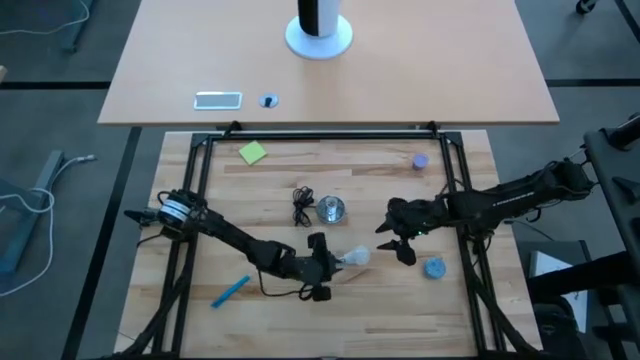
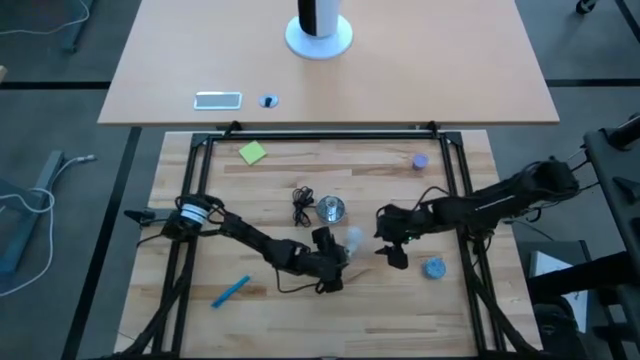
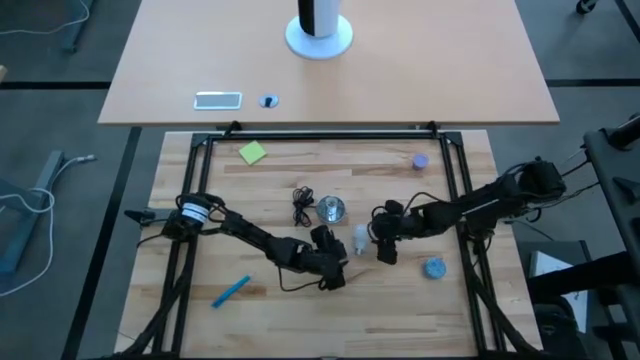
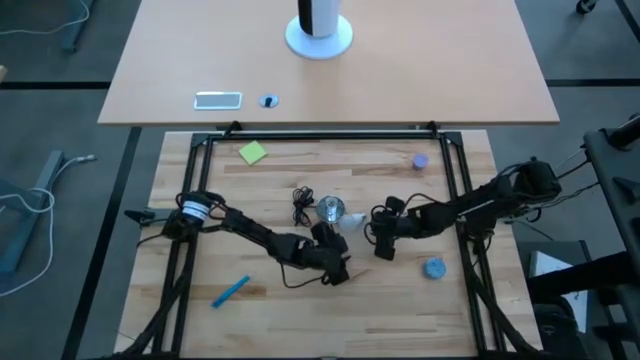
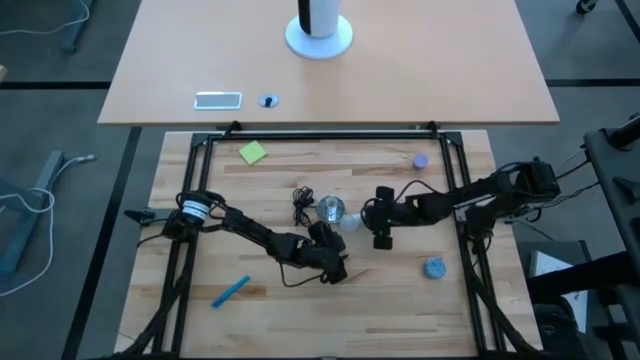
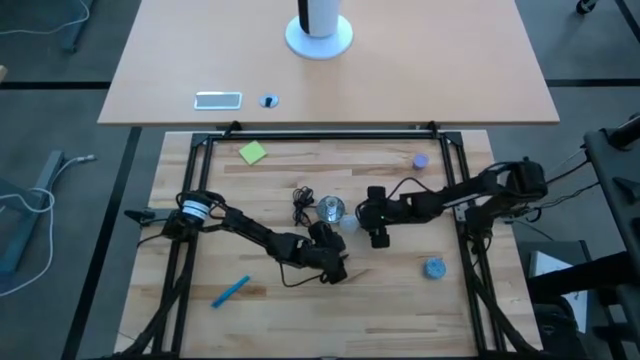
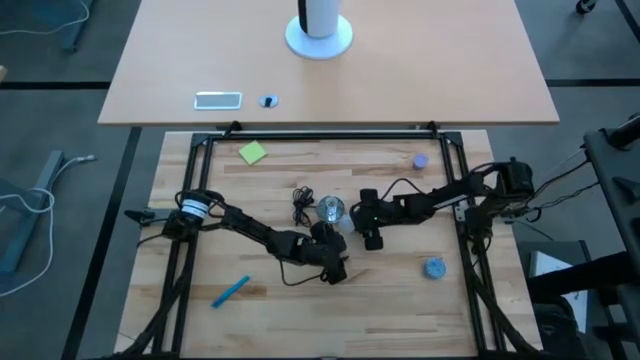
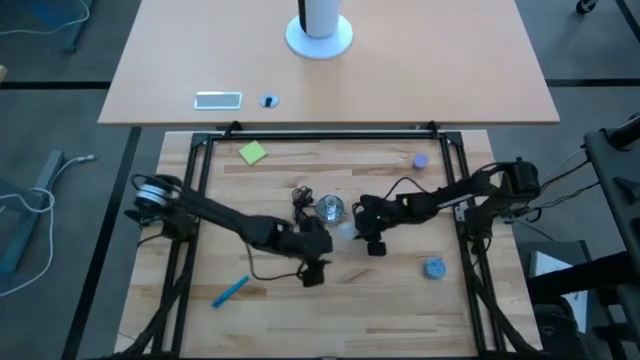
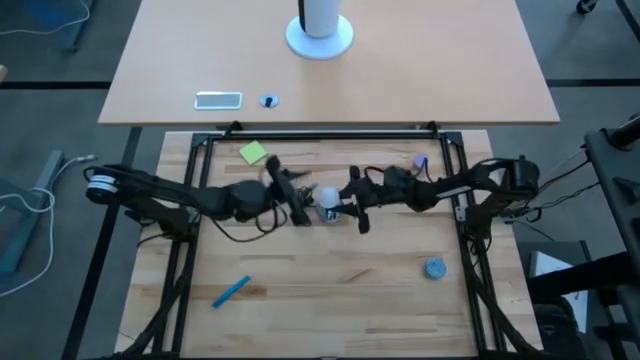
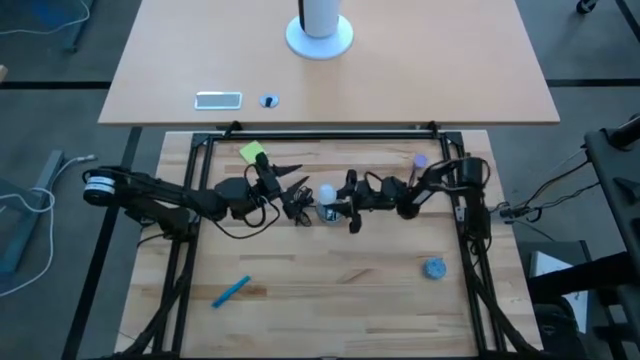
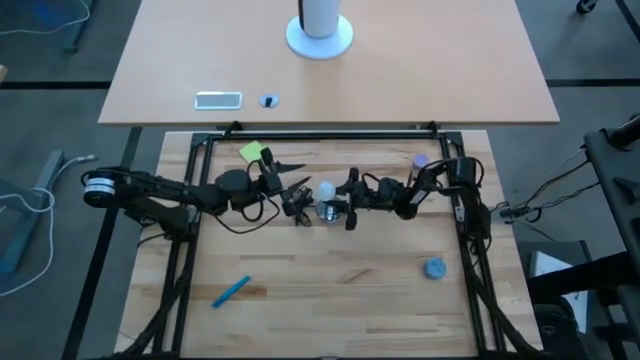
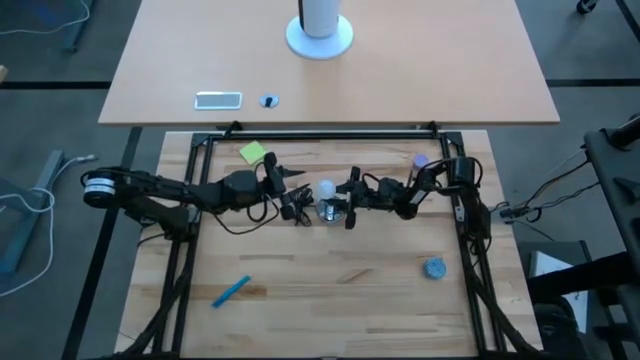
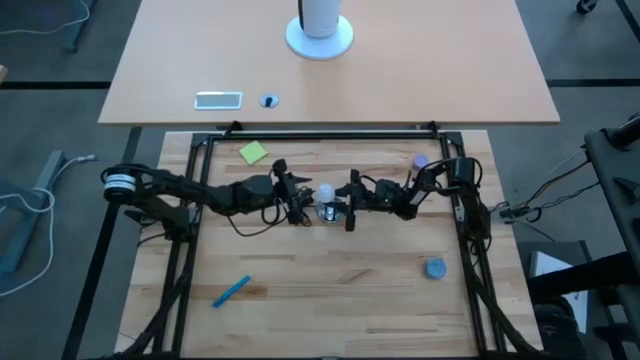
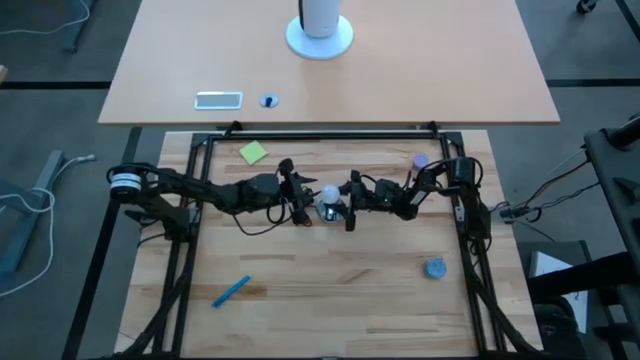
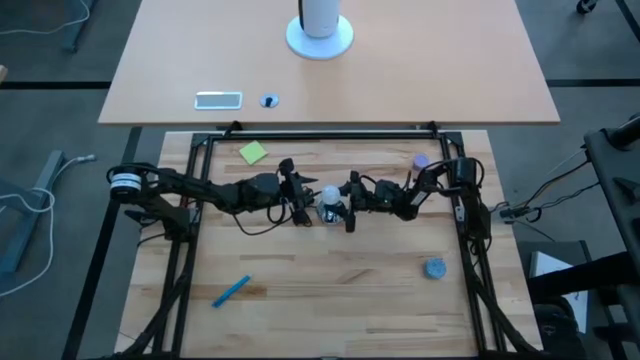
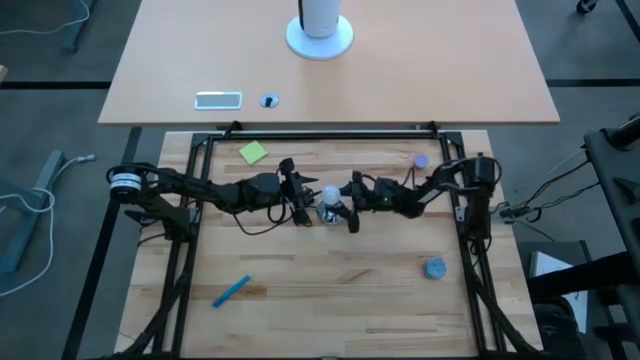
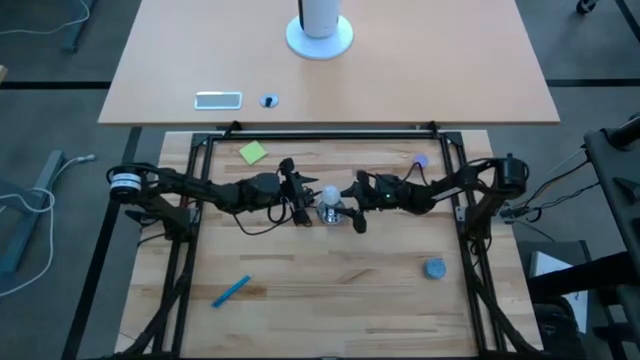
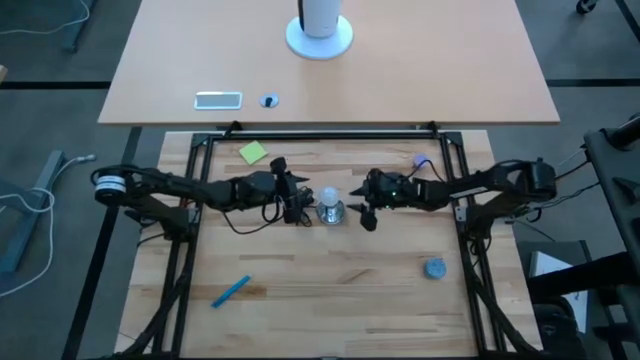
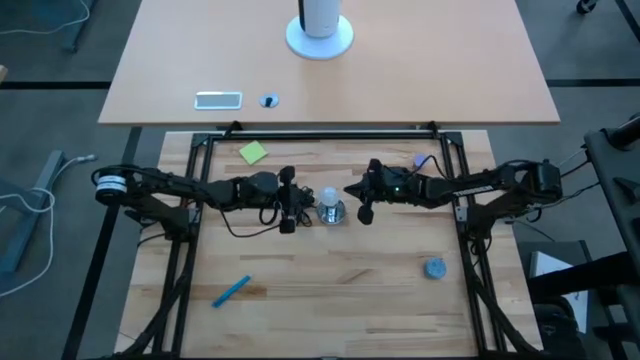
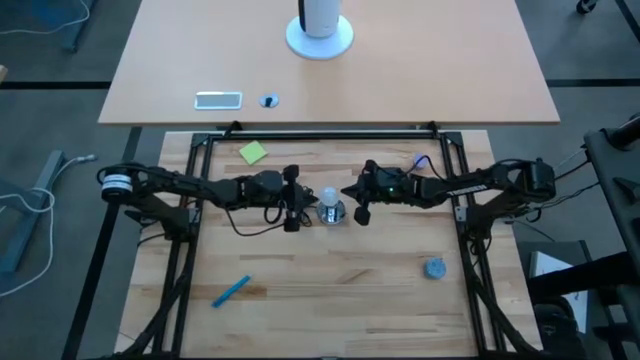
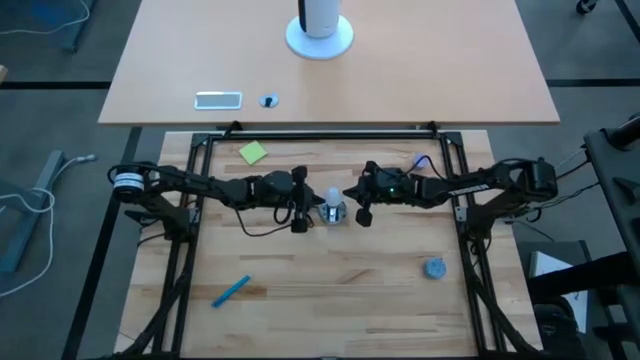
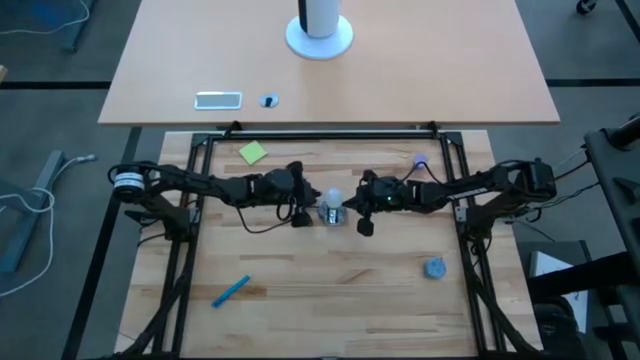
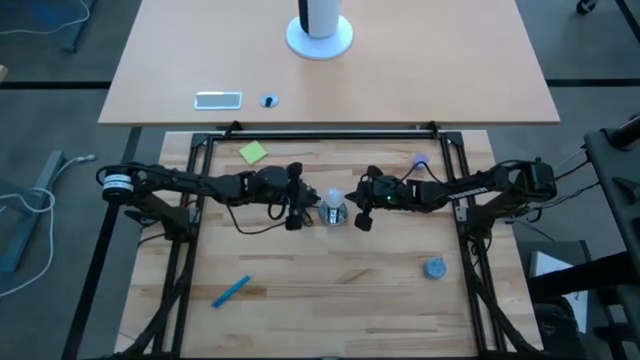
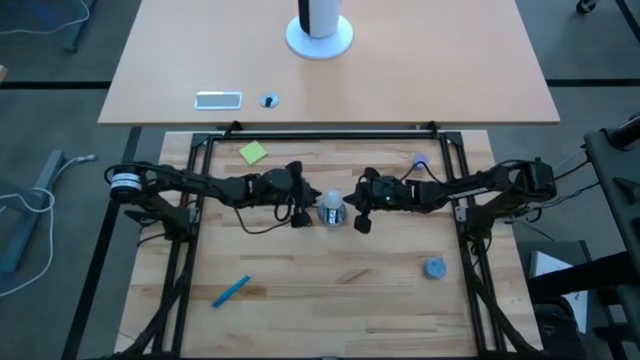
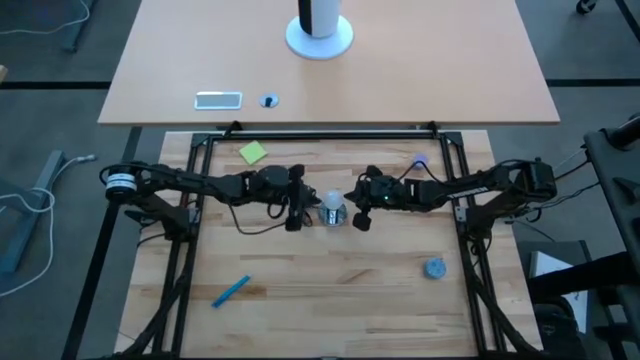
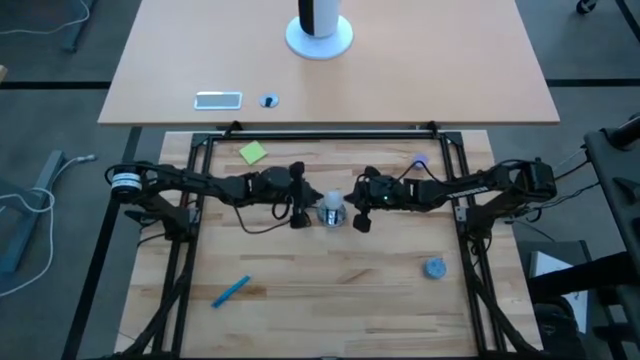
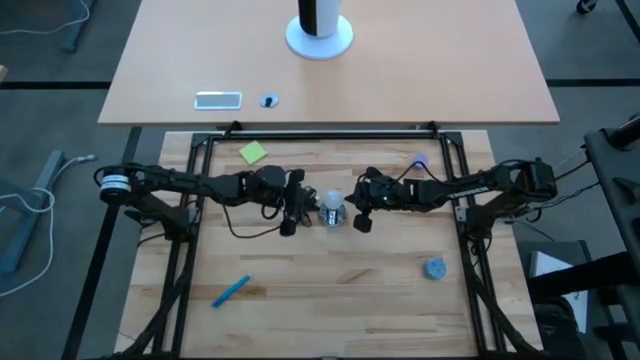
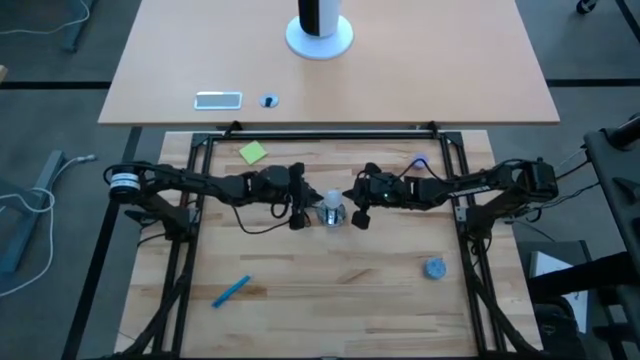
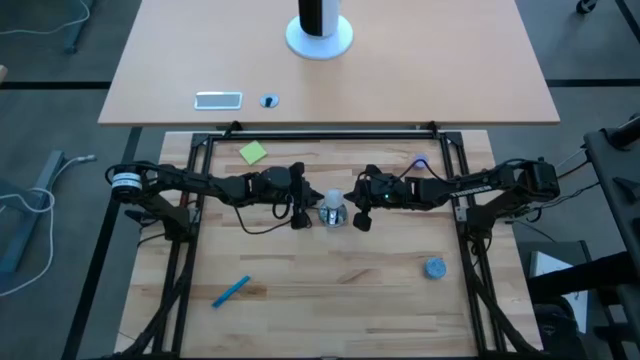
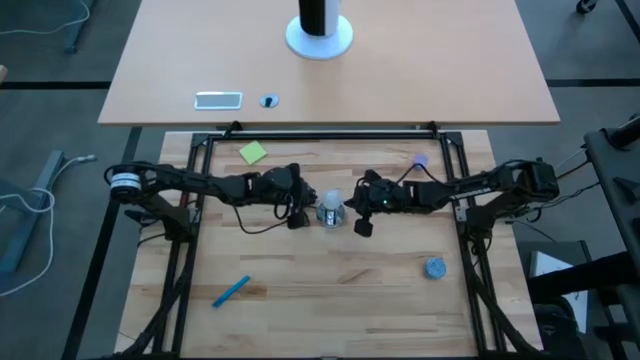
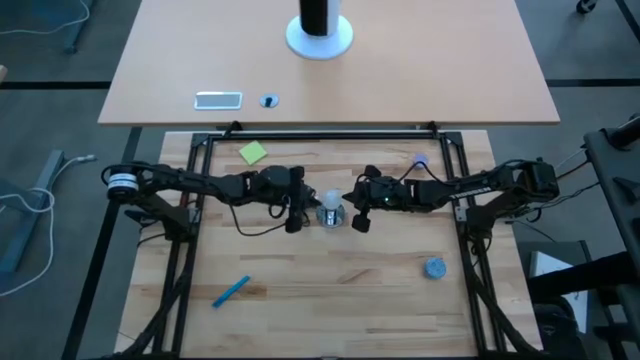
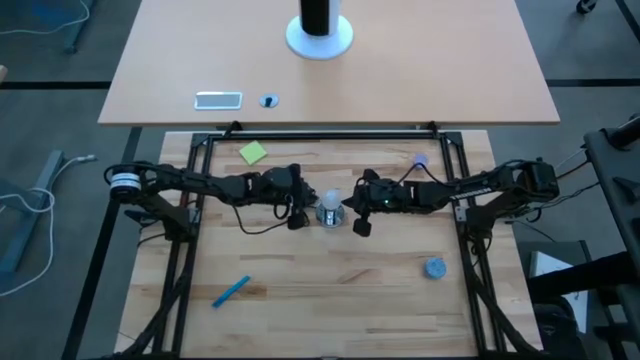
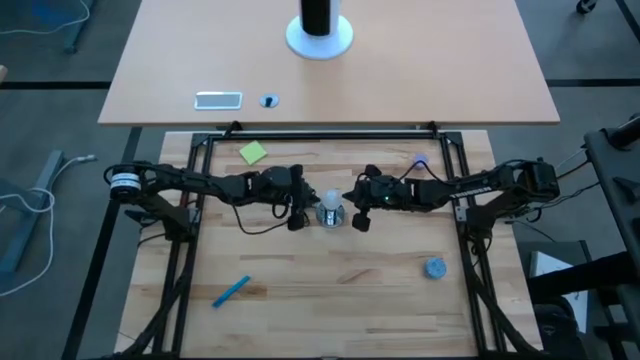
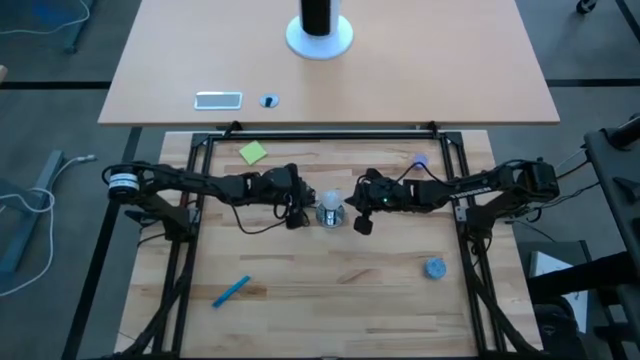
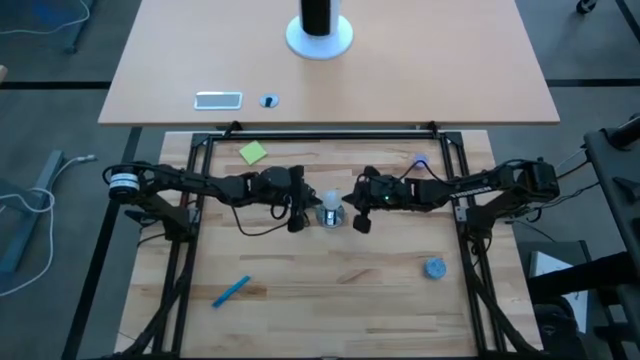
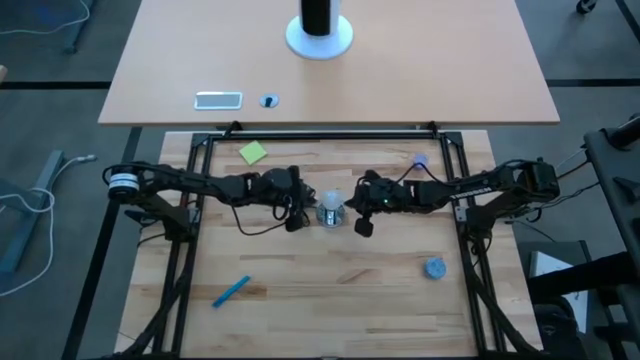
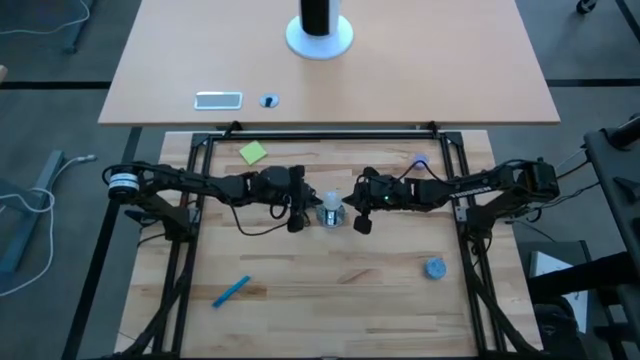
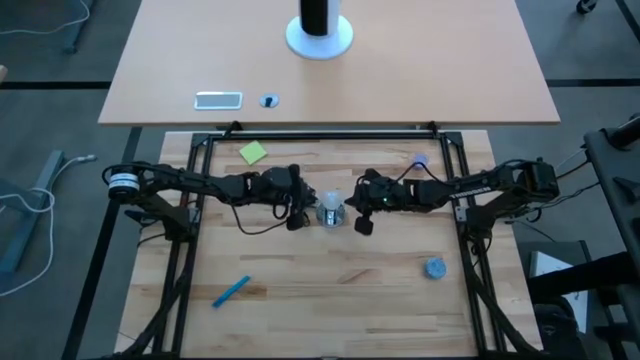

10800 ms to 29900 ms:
Task: Screw lightbulb
Insert the lightbulb into the lamp
